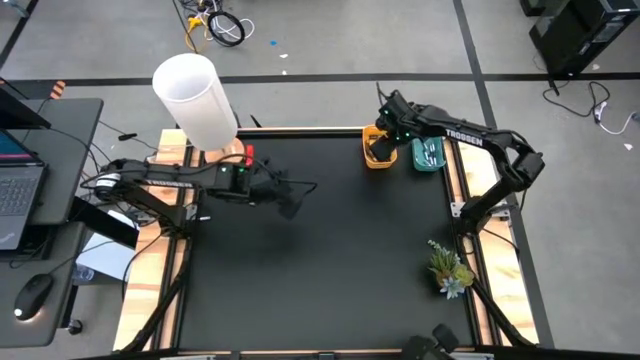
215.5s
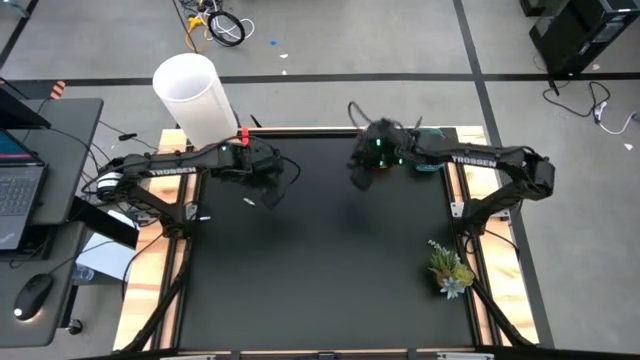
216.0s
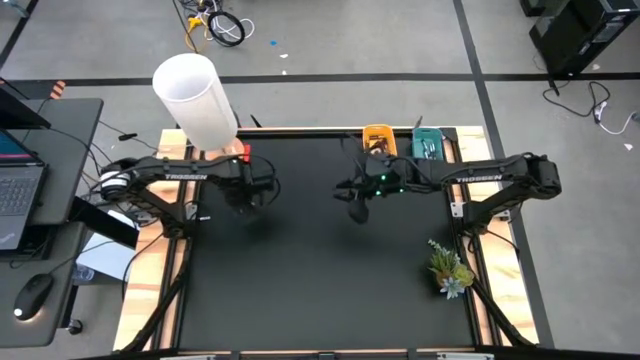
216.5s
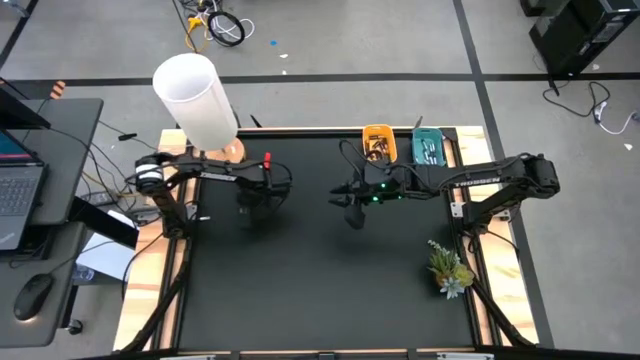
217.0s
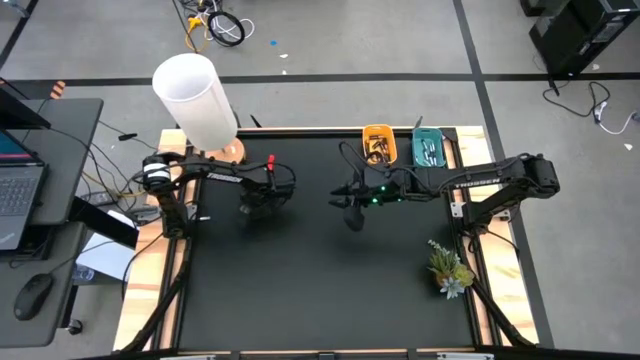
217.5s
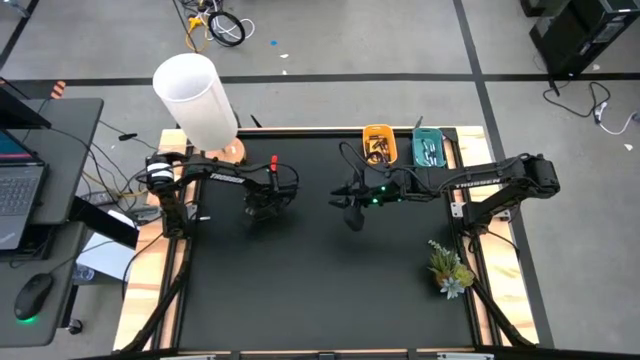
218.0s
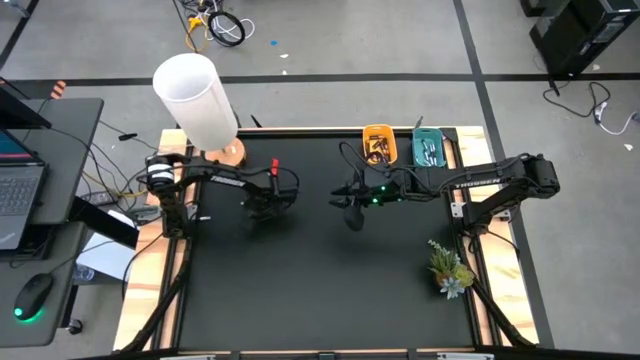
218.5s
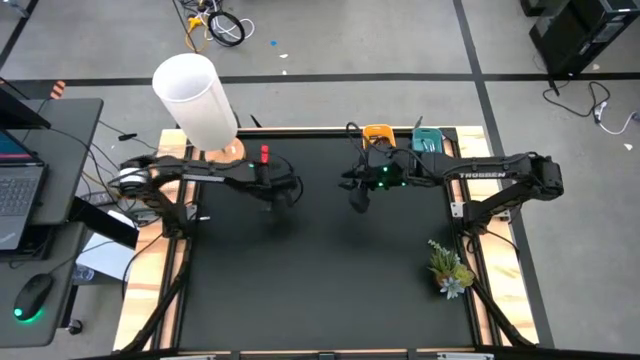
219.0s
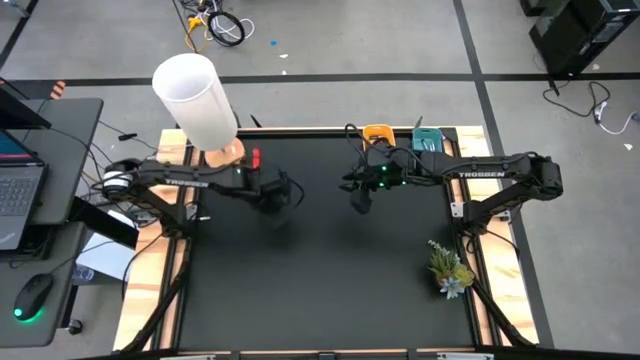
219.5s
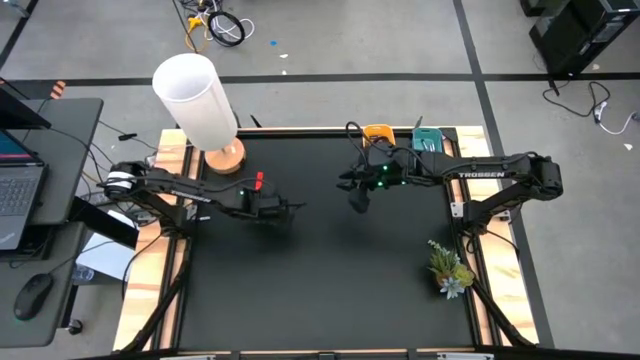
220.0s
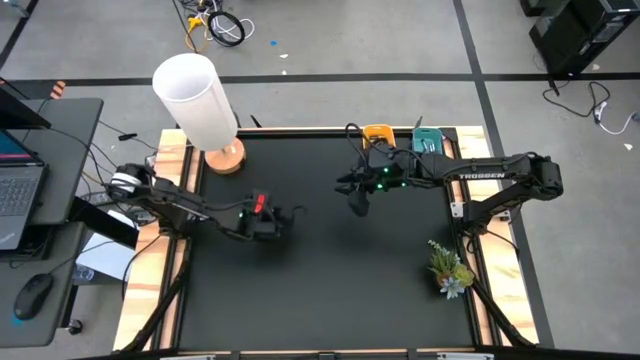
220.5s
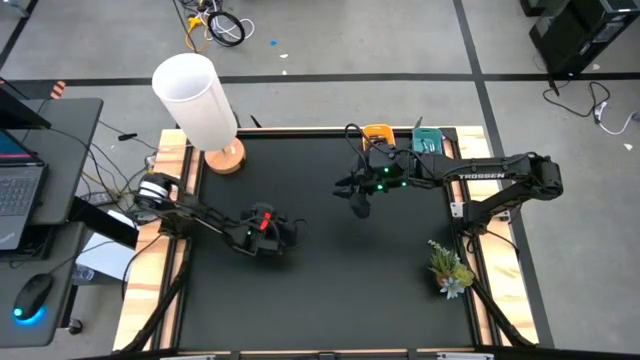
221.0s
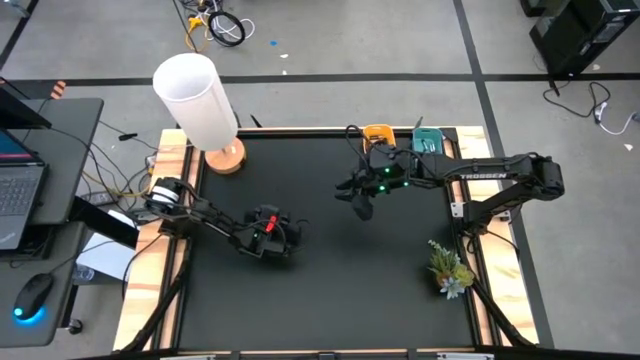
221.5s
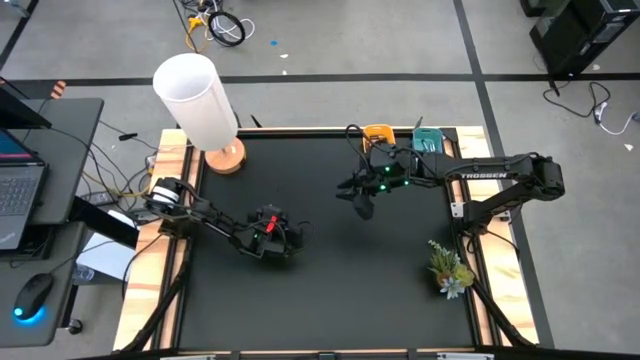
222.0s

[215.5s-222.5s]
Task: Sort batteries
Put the top silver battery into the blue bin

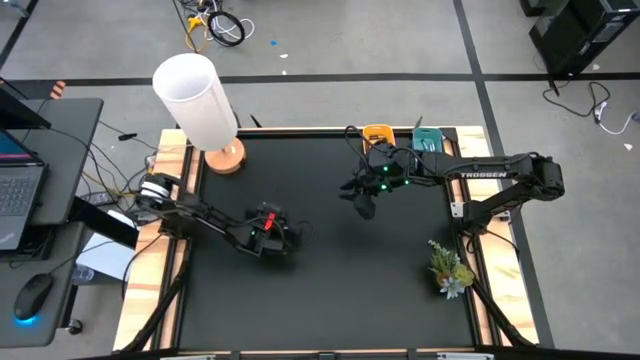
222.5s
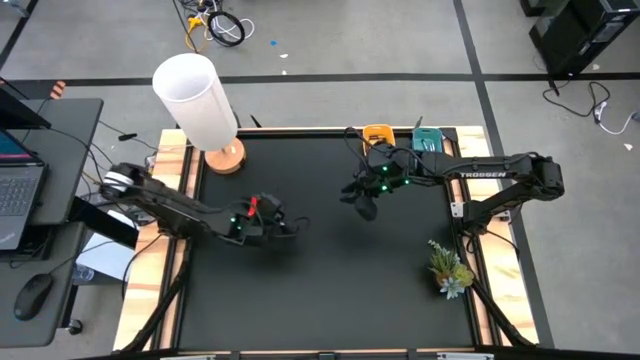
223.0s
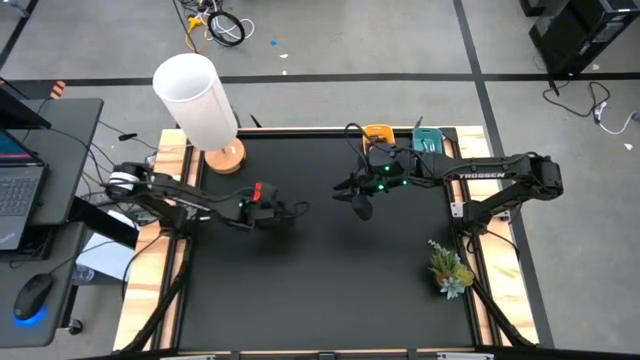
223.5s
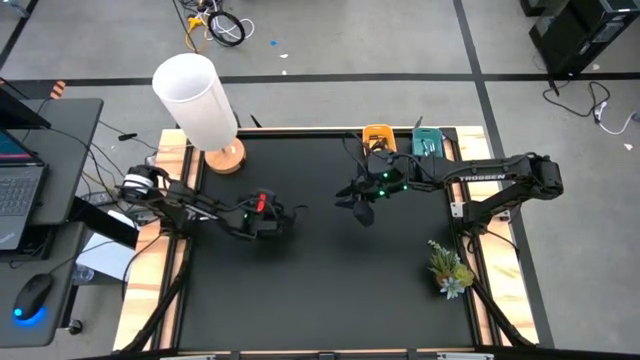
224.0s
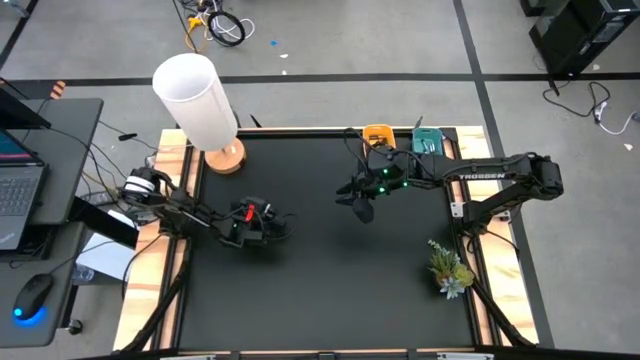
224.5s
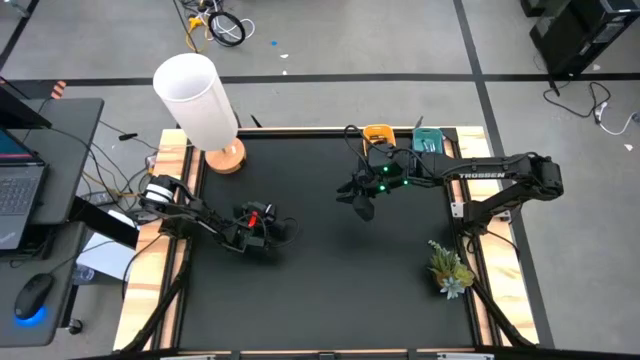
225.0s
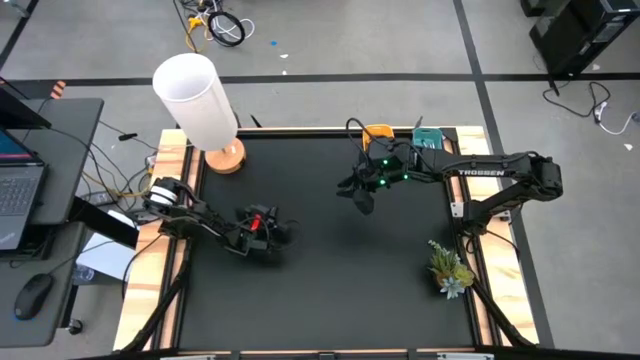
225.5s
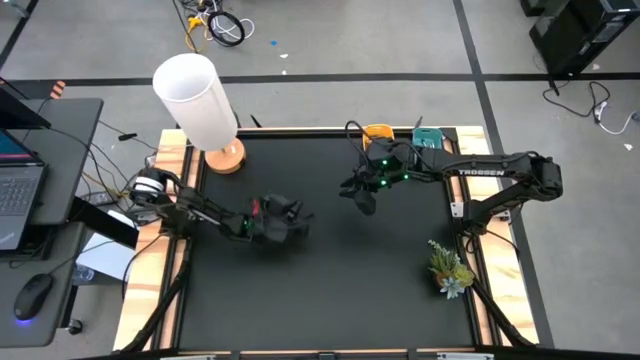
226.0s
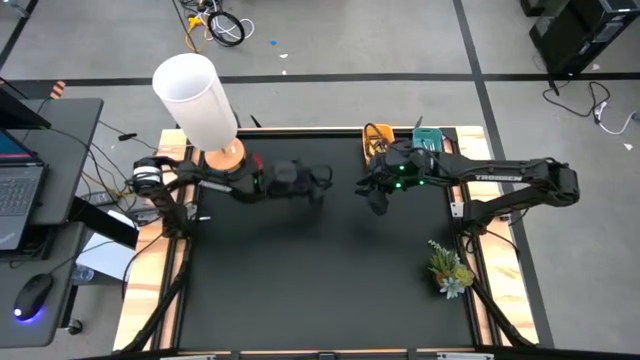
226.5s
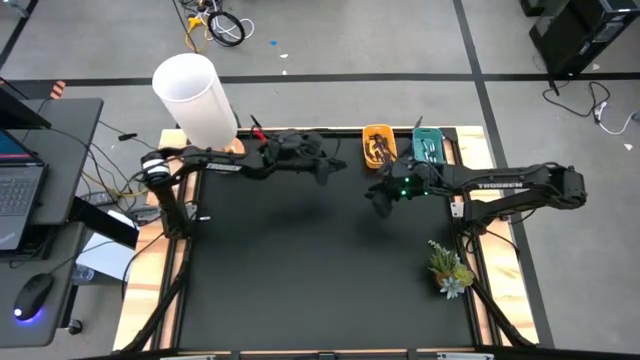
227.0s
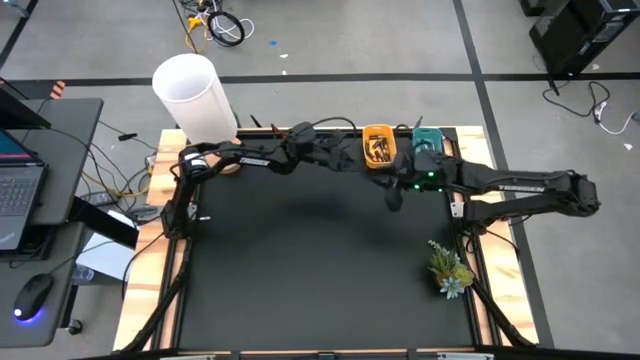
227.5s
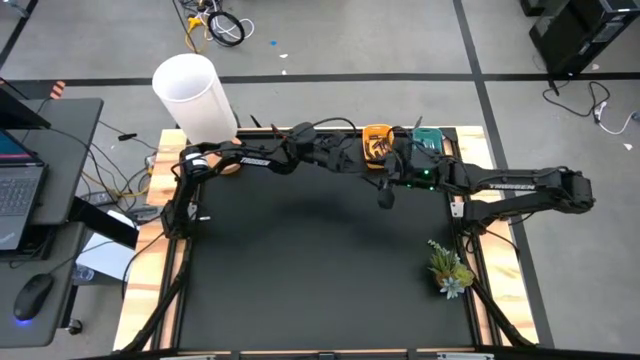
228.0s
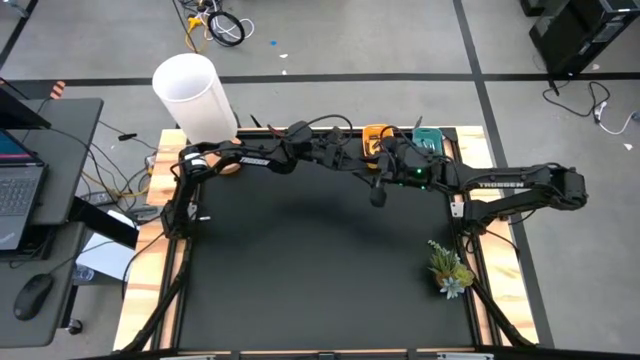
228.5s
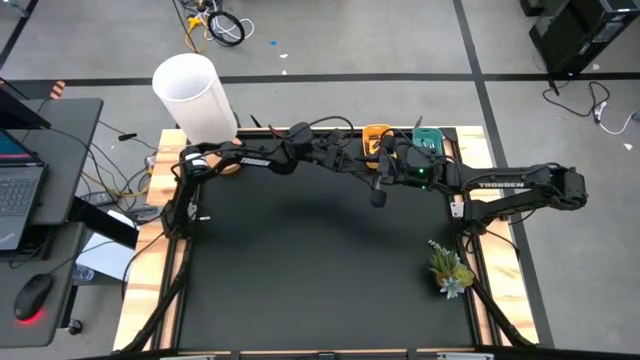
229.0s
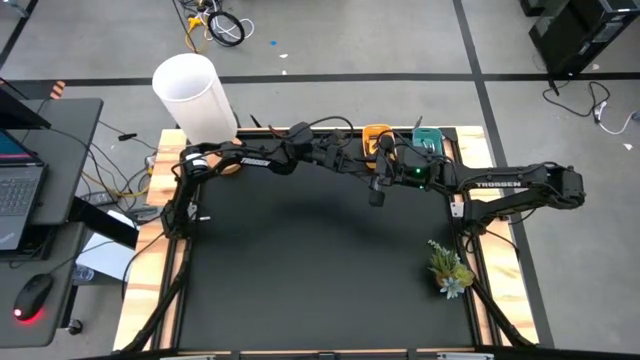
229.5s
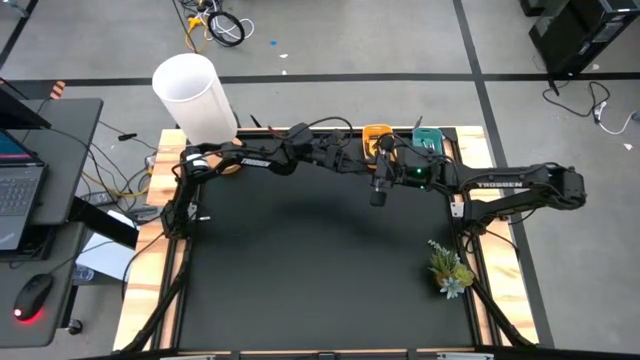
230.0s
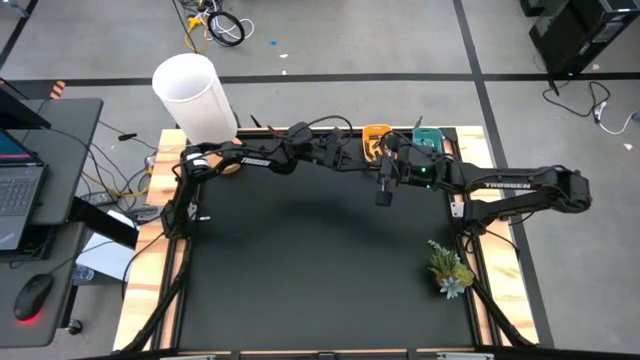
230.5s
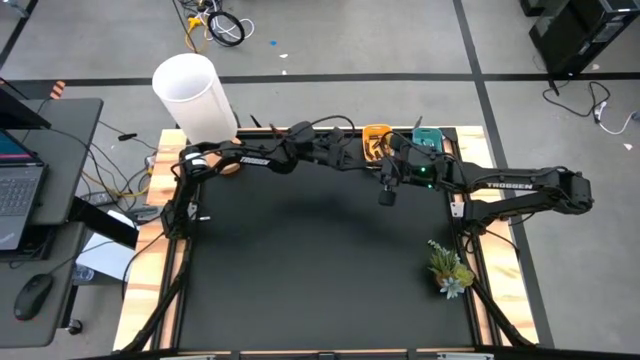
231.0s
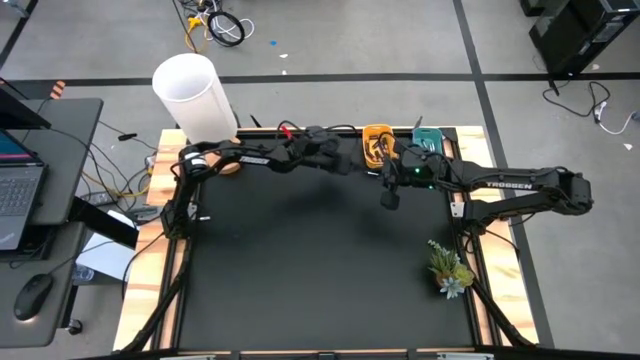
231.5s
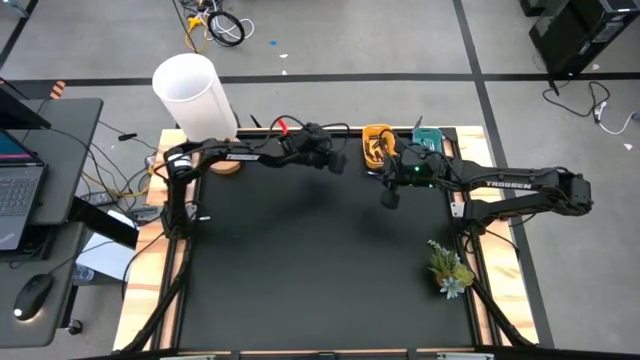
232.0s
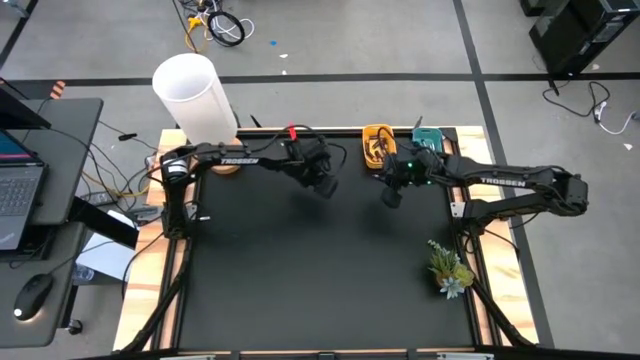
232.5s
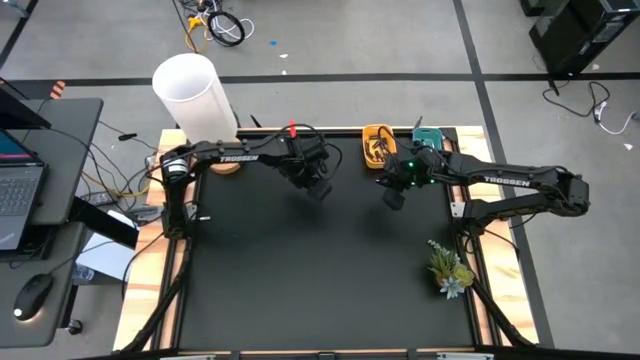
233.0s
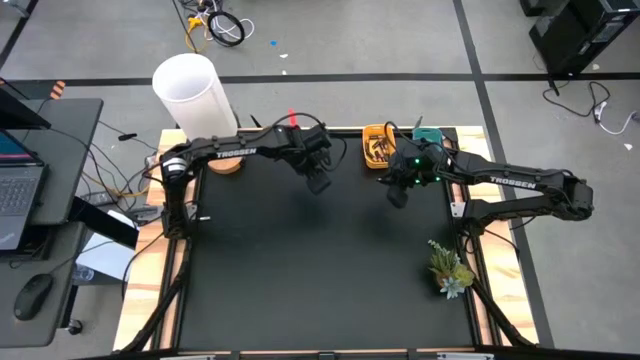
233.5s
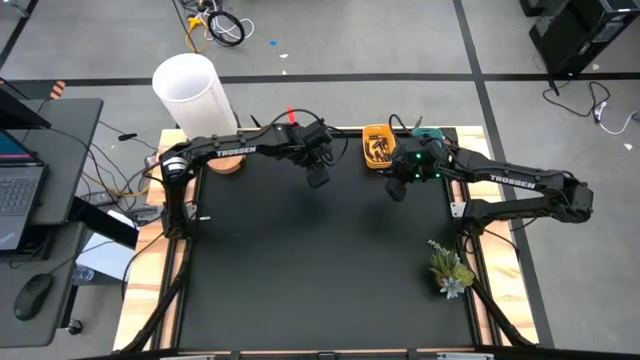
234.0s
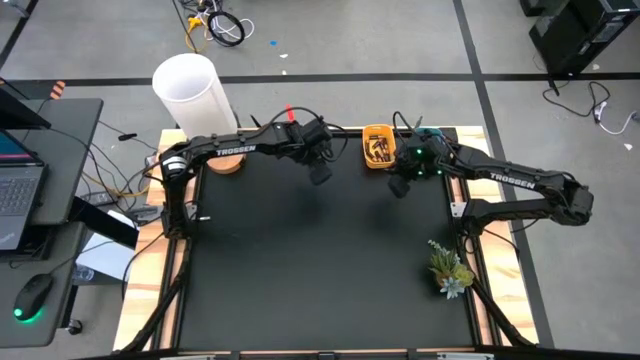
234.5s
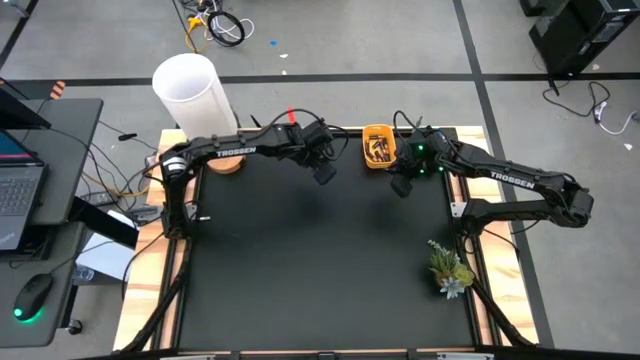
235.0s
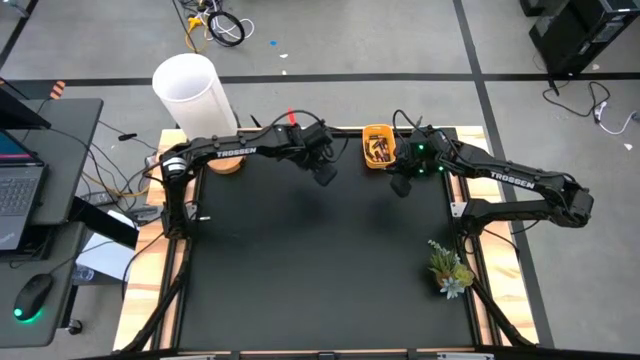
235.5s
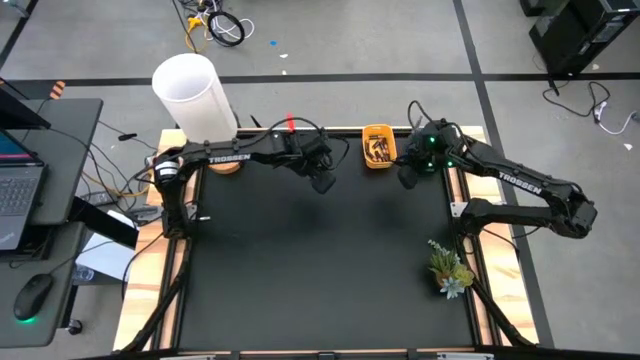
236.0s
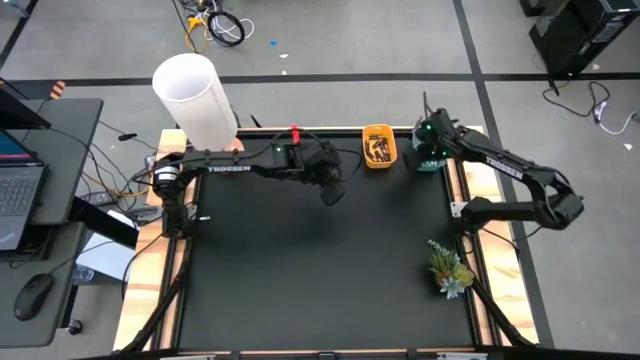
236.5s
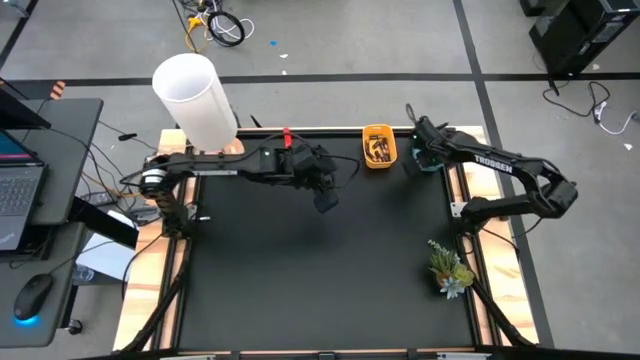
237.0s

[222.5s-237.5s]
Put the top silver battery into the blue bin
